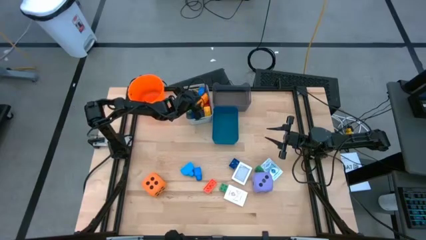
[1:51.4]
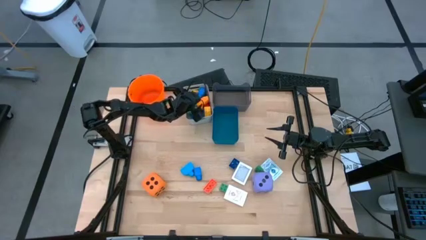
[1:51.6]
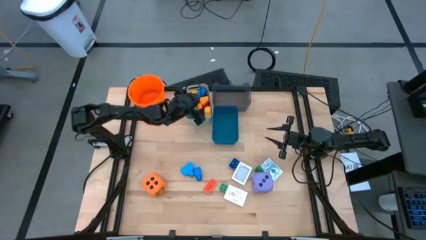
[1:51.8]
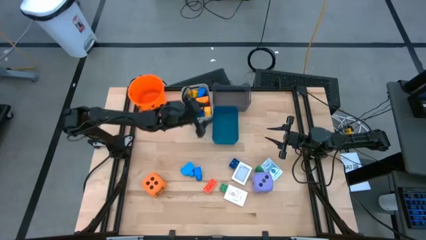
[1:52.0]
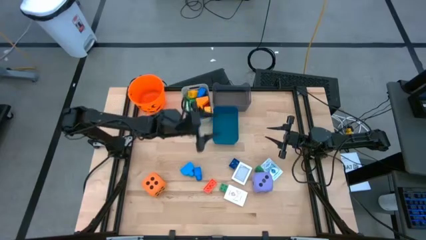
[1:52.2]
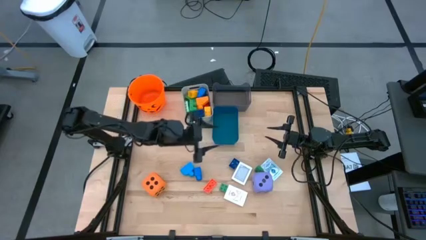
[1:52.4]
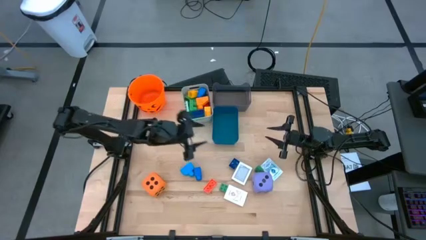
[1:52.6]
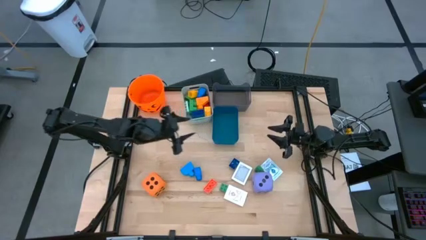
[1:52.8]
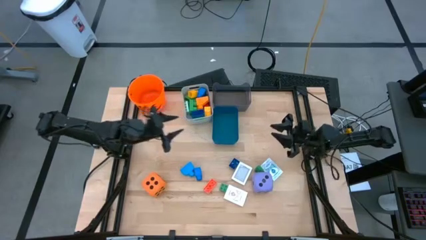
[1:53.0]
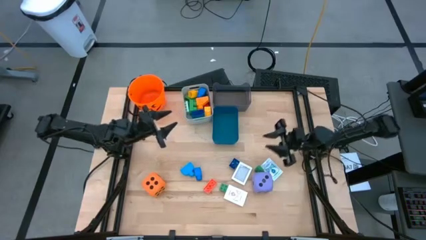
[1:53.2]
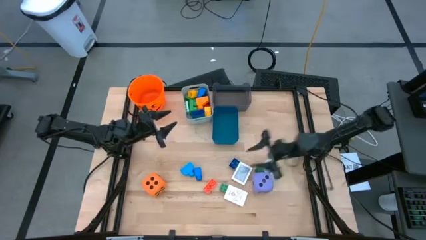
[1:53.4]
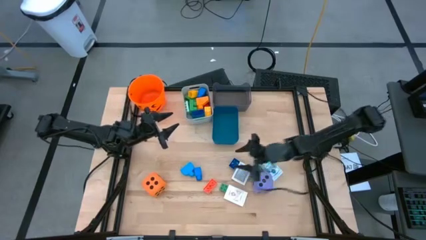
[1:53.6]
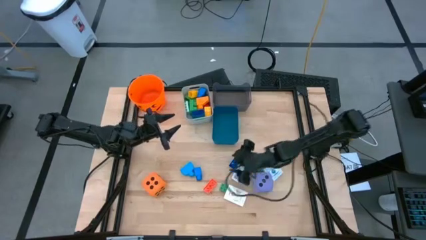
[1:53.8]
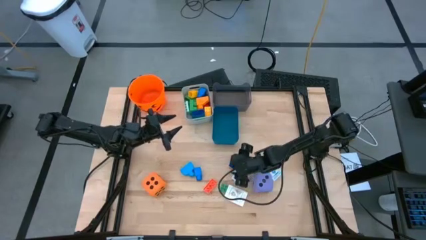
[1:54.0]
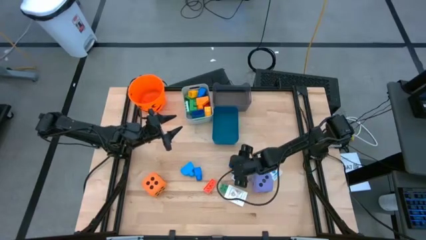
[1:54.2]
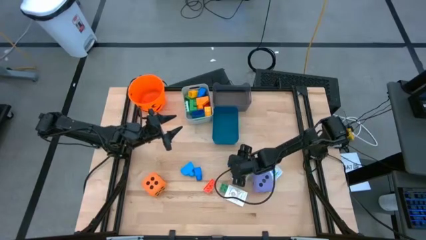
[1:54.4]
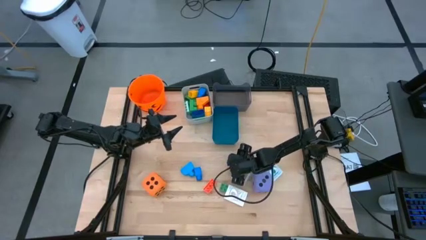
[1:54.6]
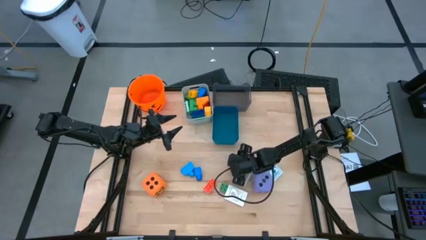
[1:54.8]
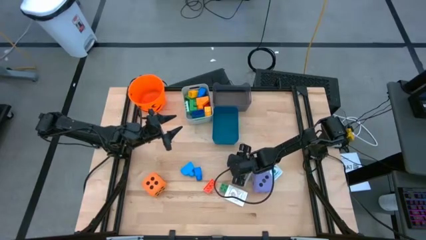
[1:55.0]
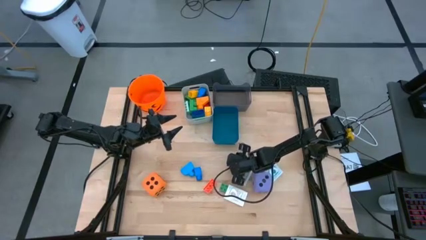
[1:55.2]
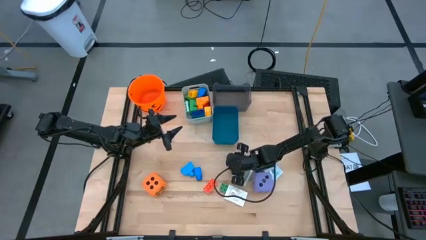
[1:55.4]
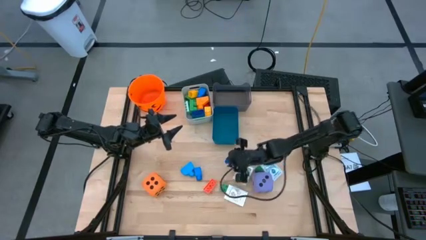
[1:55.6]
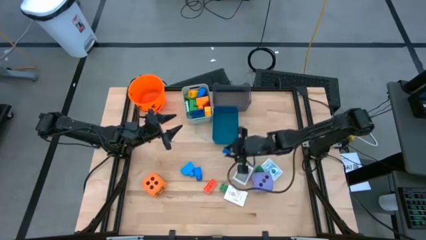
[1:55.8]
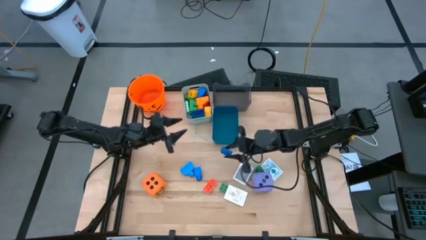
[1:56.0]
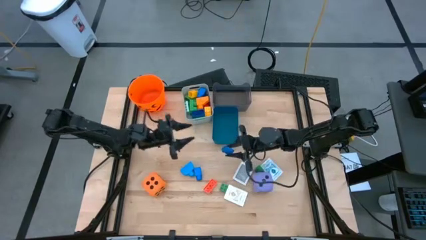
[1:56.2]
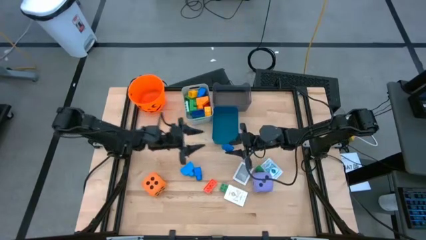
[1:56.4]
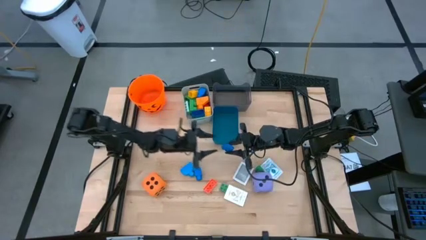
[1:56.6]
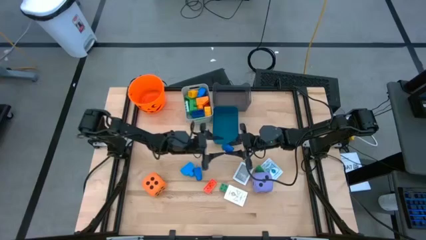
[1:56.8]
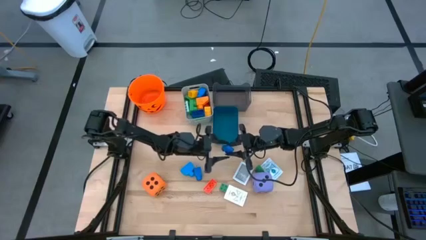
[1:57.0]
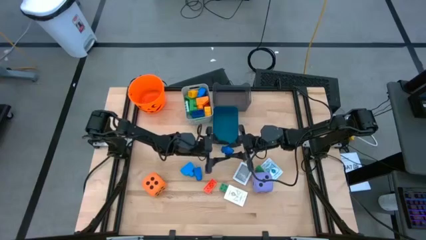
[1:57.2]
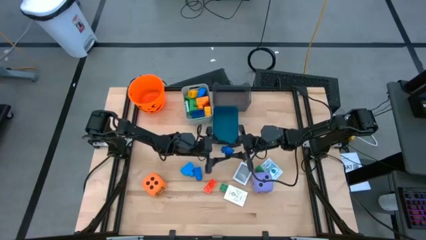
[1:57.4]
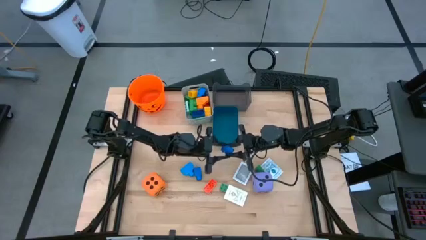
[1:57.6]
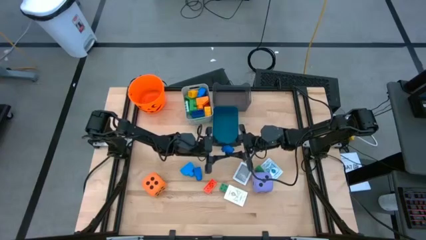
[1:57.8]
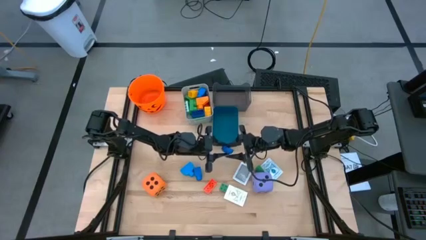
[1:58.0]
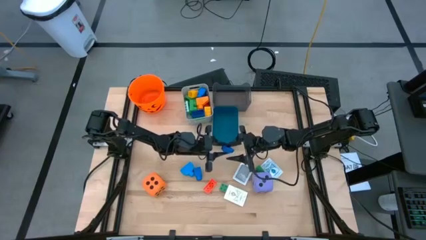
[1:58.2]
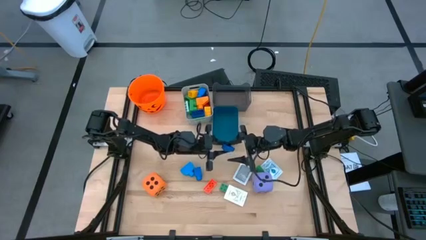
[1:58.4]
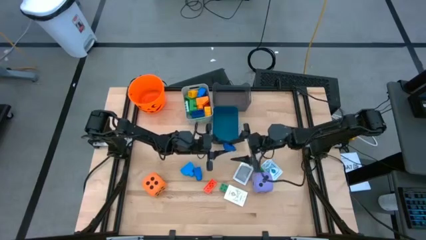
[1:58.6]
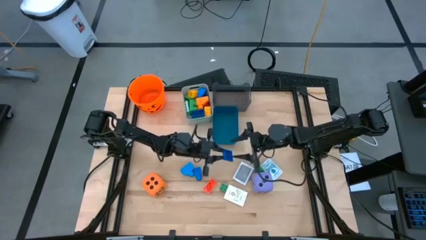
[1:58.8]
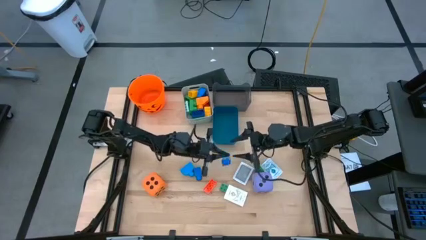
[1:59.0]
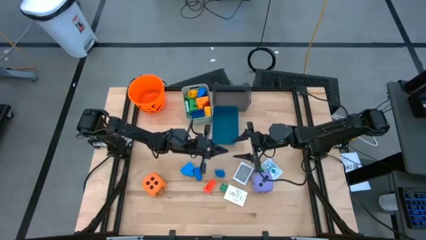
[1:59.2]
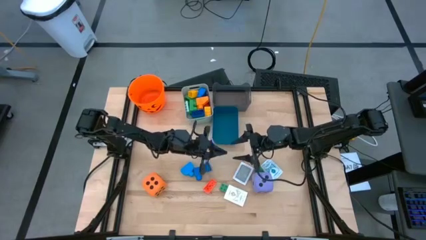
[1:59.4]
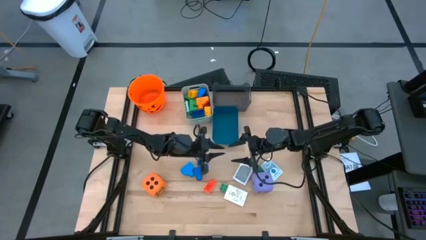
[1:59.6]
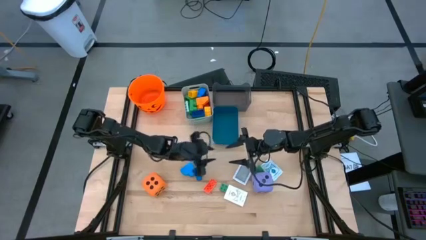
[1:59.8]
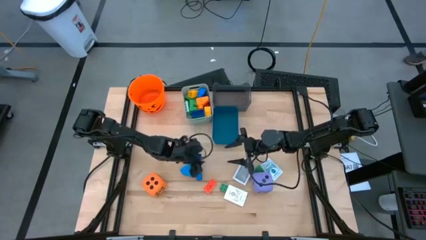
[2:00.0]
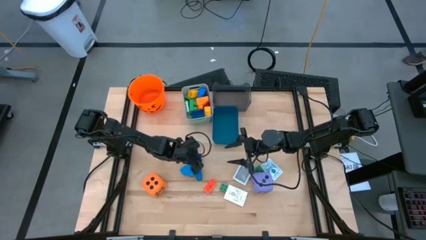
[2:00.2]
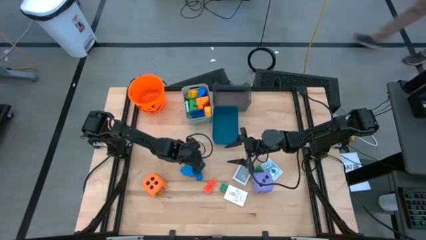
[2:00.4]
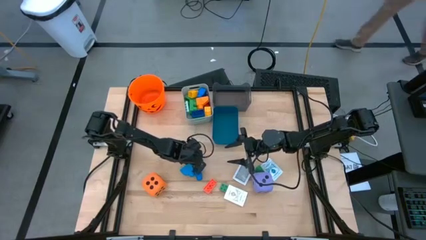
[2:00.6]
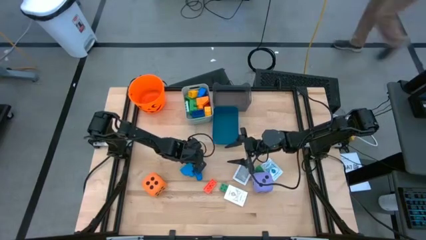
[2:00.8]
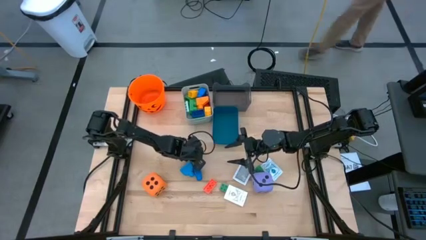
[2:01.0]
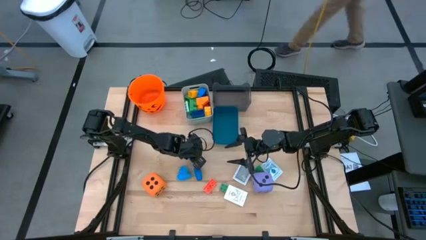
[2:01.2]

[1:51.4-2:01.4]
Task: Pick & Place Toys
Put the small blue gamepiece into the white bin

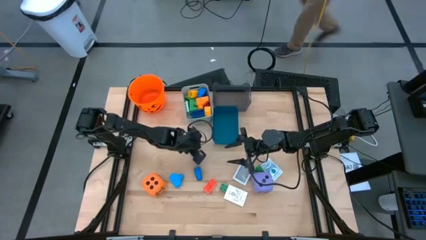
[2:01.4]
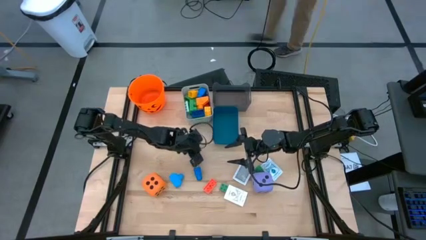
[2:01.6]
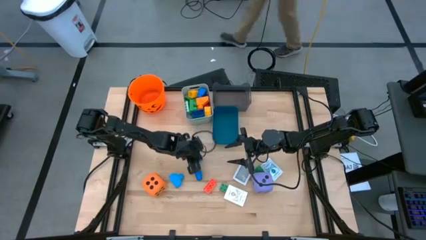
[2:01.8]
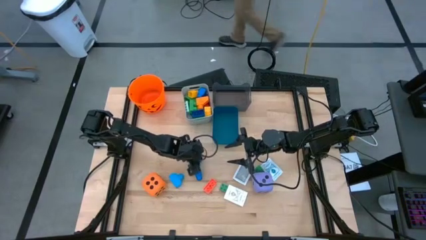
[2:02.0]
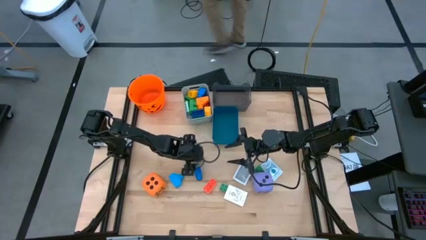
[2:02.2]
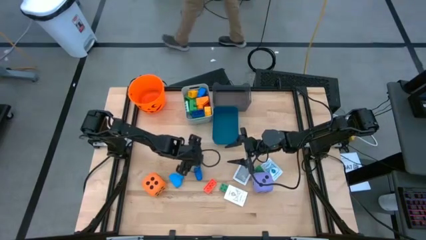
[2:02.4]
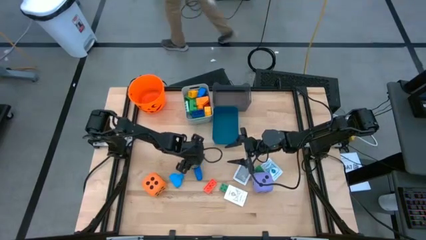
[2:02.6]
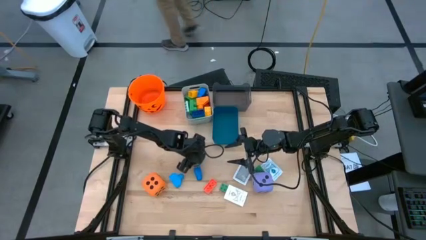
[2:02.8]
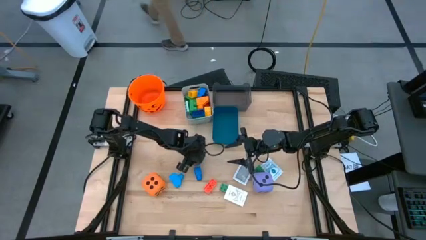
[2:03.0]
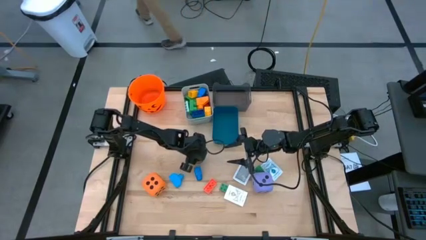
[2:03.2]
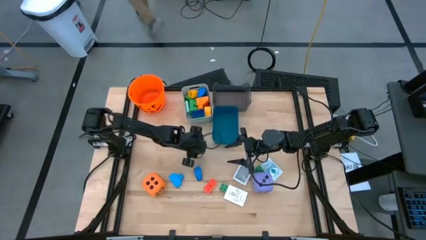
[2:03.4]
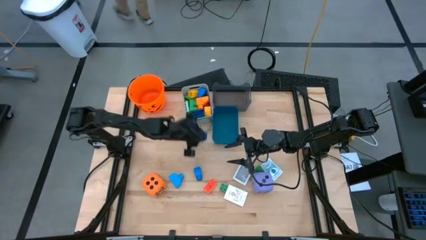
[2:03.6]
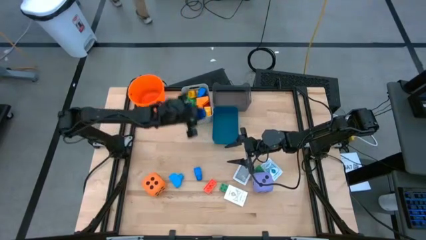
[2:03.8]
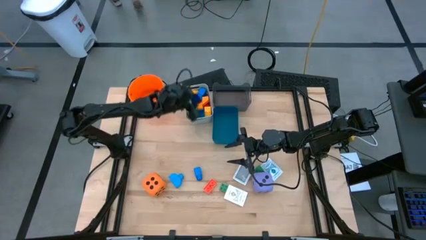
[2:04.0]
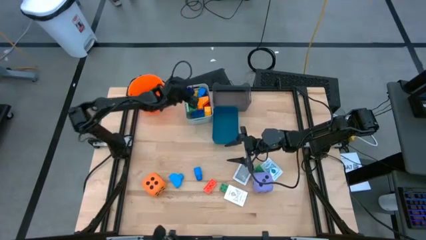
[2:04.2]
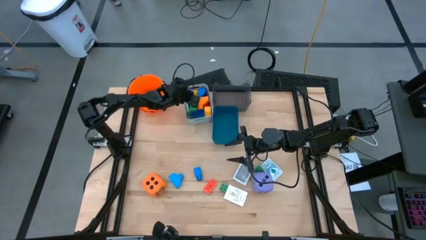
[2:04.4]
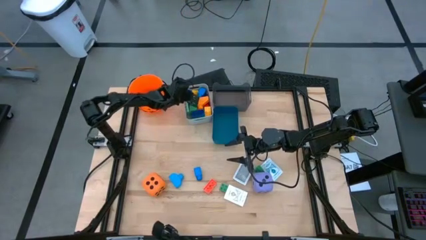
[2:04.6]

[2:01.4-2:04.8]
Put the small blue gamepiece into the white bin

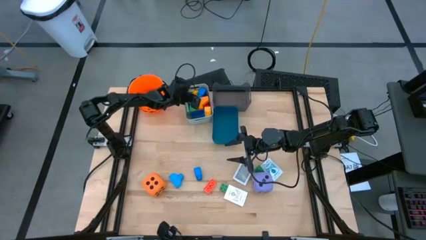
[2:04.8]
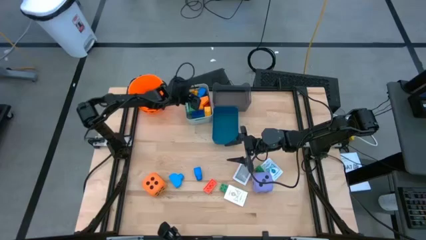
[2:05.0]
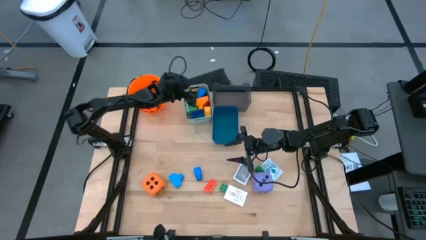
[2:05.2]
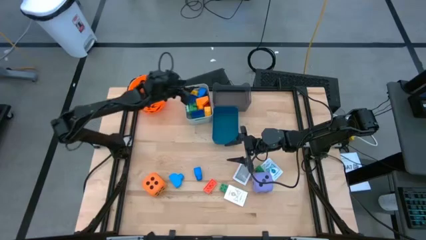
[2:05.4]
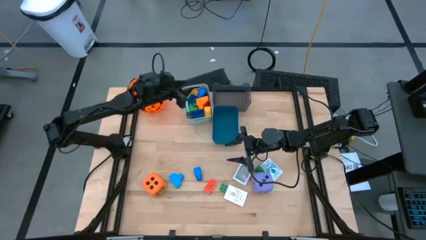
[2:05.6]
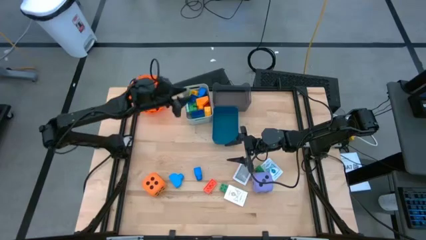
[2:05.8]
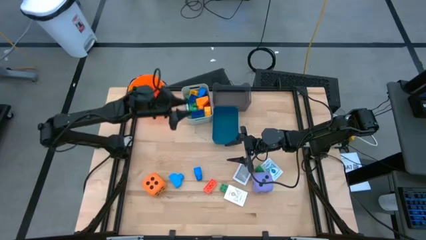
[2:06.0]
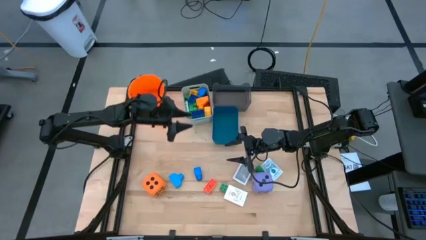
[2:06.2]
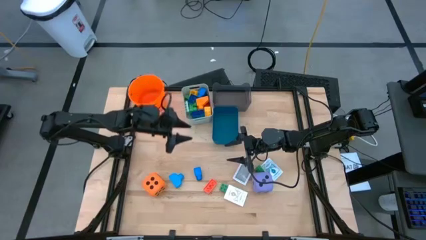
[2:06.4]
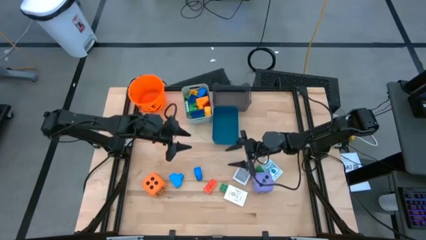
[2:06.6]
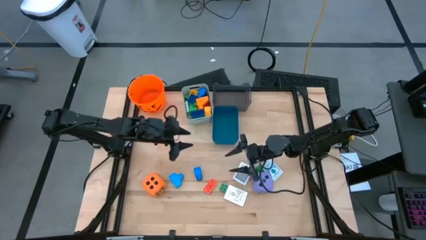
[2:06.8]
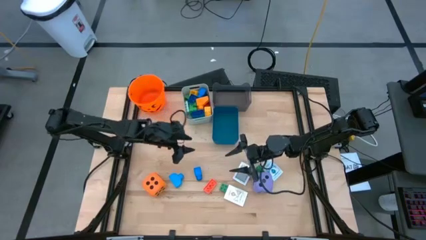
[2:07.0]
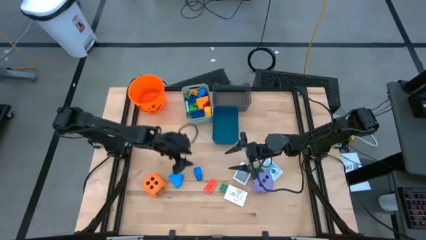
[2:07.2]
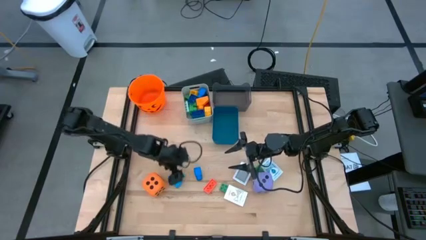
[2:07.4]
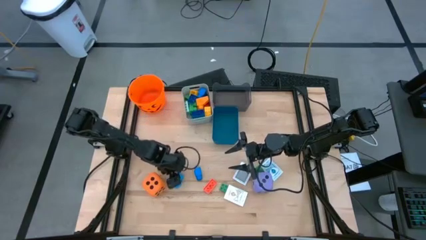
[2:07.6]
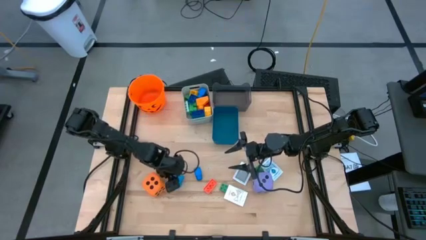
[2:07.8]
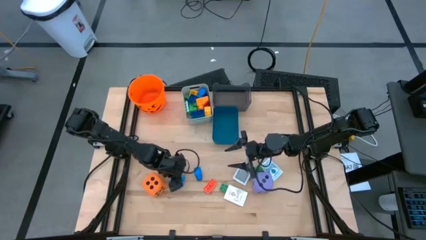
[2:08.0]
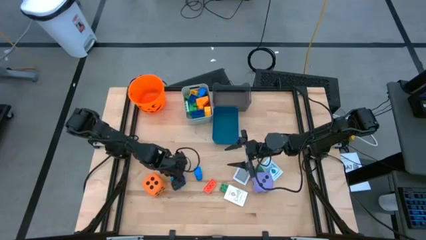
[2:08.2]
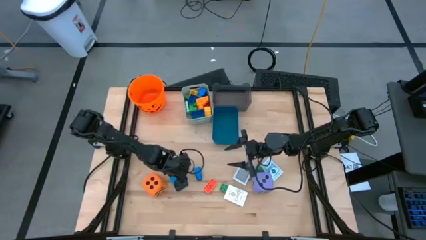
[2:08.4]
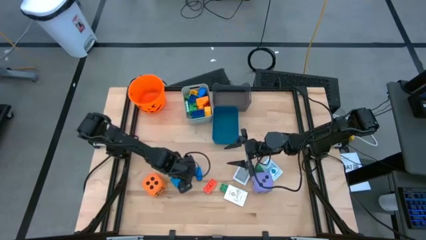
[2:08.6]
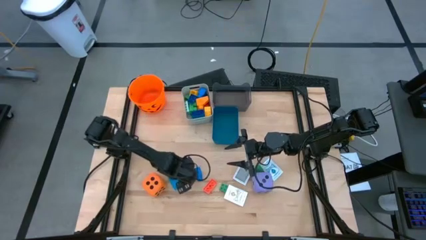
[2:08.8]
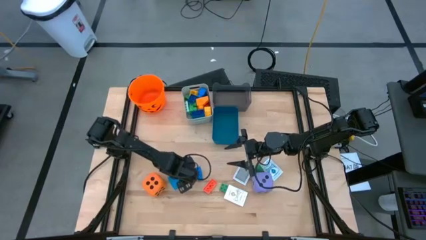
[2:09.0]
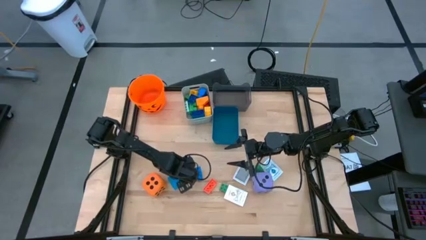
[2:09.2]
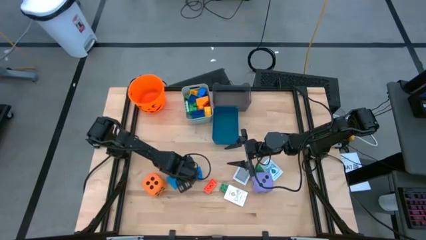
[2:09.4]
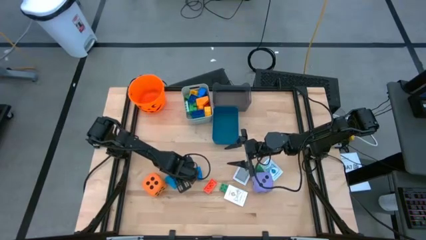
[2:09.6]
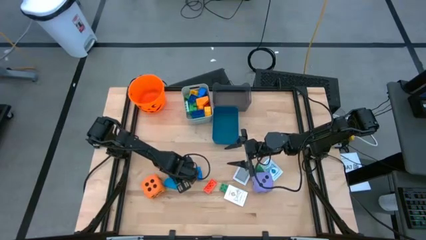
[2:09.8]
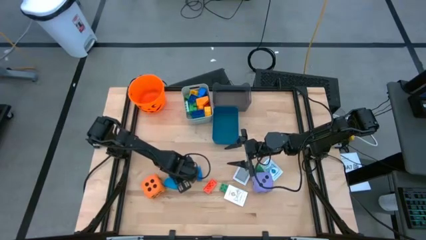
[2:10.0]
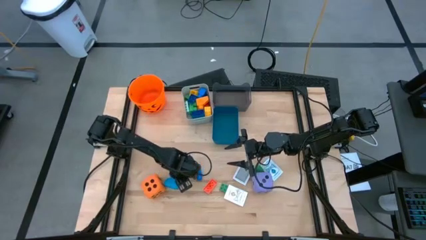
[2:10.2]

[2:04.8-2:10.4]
Put the light blue 1 stud gamepiece into the white bin
